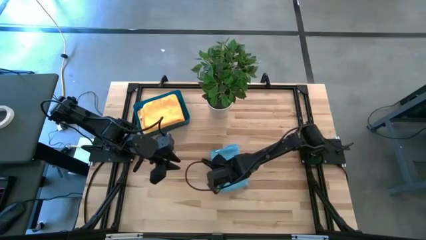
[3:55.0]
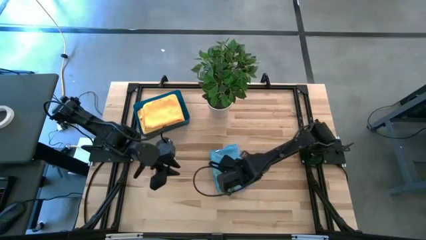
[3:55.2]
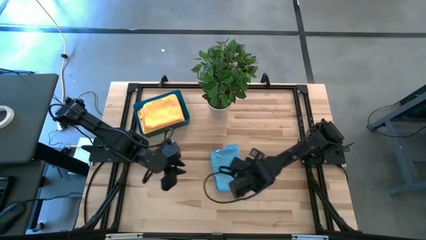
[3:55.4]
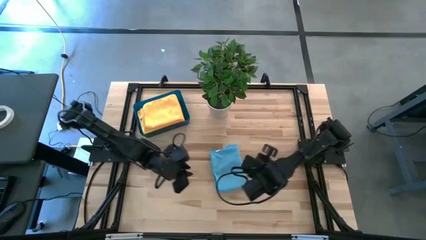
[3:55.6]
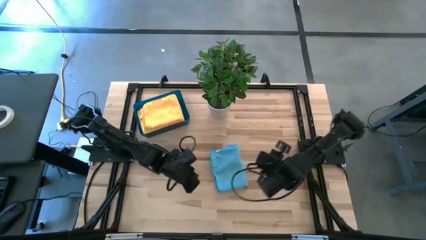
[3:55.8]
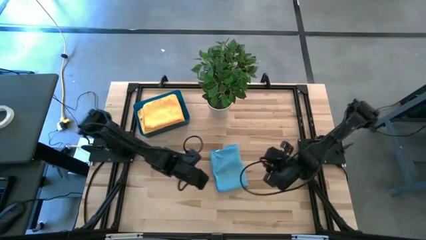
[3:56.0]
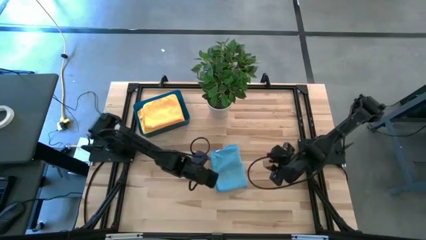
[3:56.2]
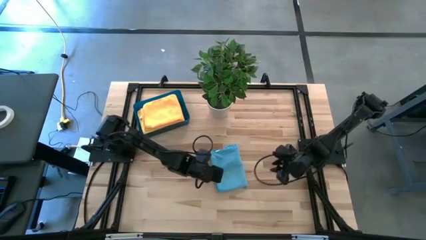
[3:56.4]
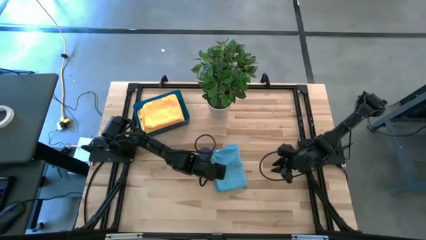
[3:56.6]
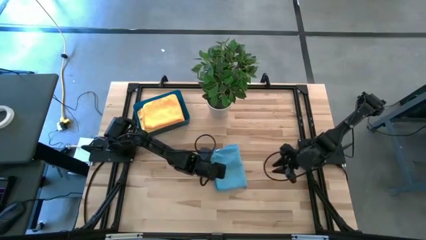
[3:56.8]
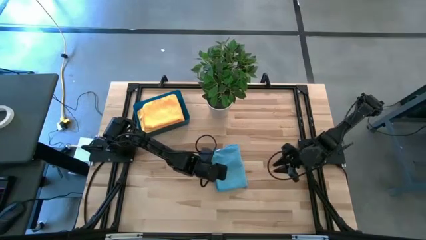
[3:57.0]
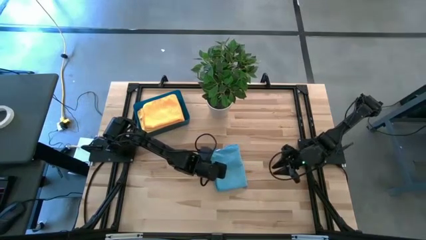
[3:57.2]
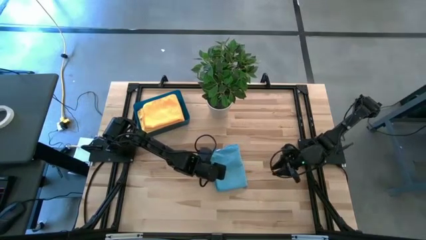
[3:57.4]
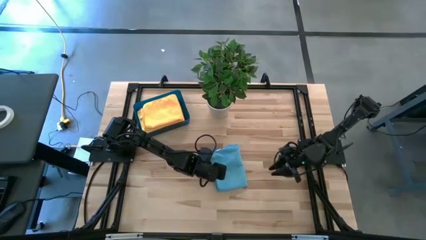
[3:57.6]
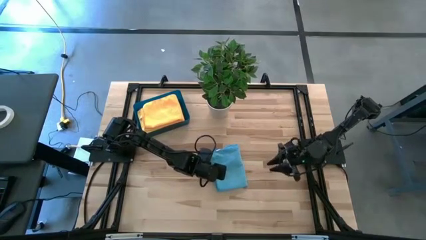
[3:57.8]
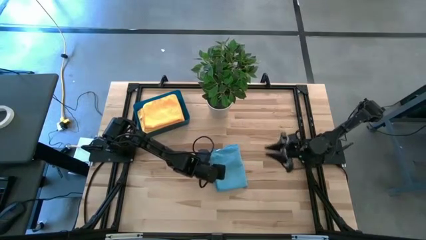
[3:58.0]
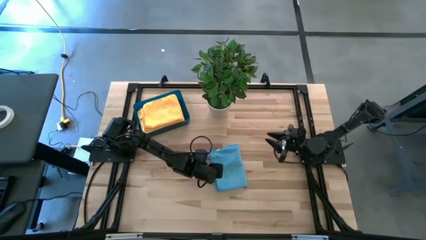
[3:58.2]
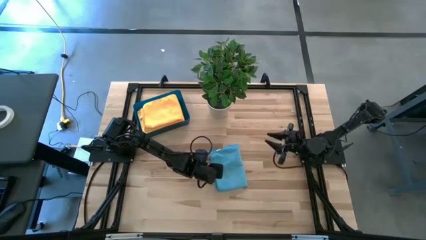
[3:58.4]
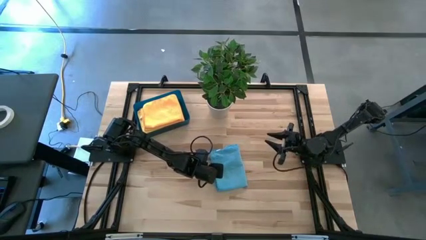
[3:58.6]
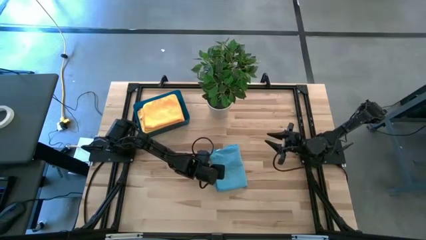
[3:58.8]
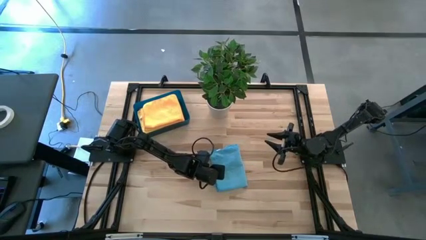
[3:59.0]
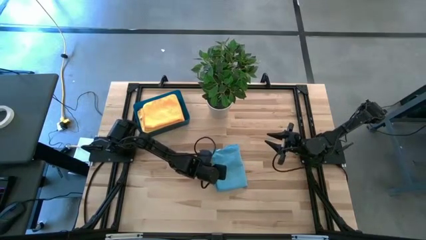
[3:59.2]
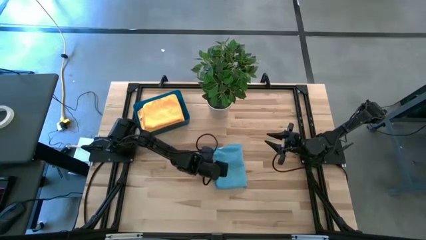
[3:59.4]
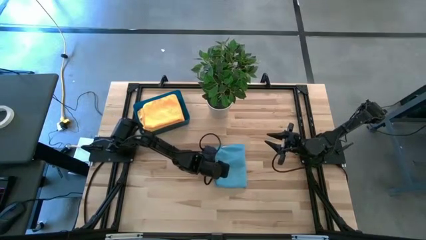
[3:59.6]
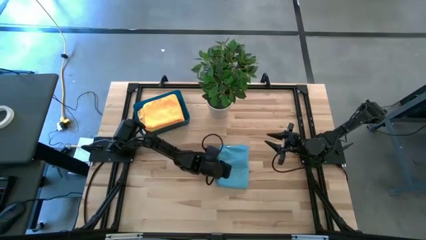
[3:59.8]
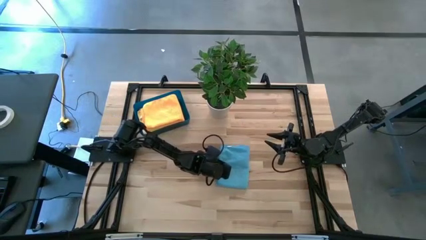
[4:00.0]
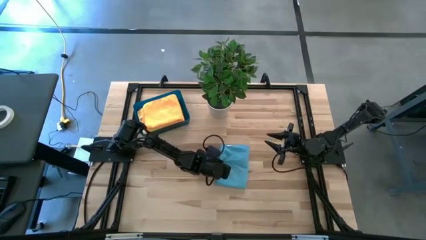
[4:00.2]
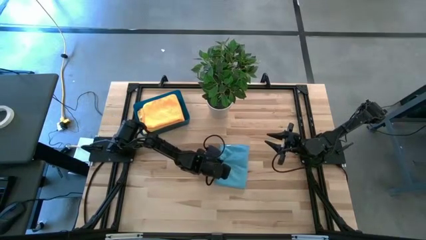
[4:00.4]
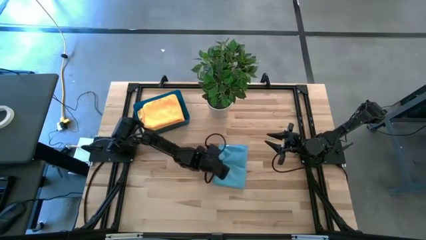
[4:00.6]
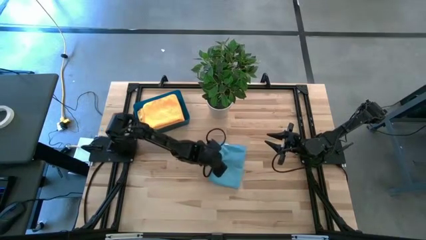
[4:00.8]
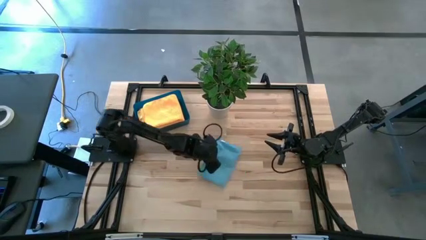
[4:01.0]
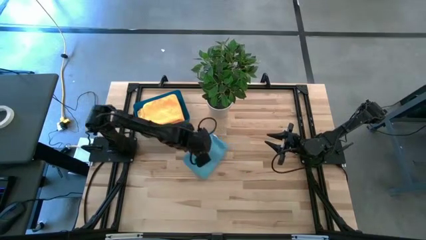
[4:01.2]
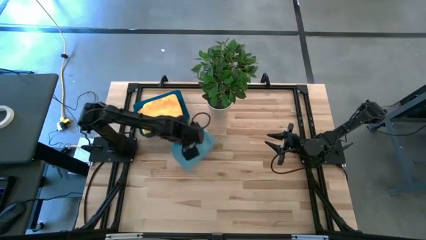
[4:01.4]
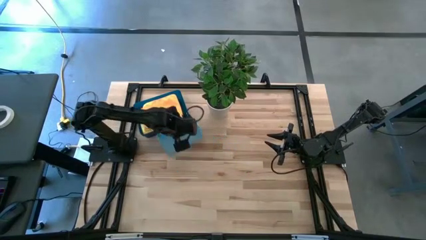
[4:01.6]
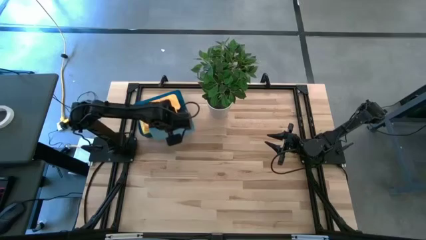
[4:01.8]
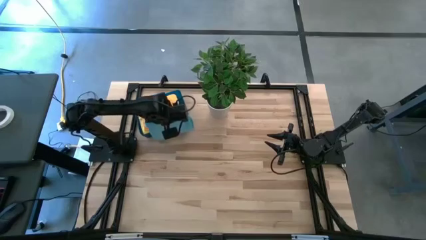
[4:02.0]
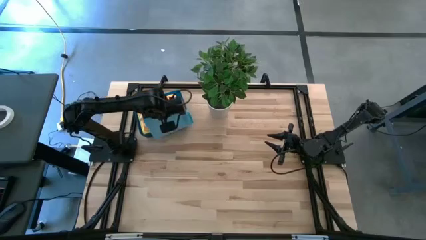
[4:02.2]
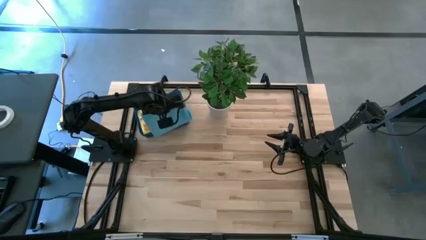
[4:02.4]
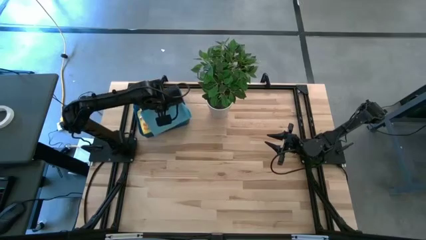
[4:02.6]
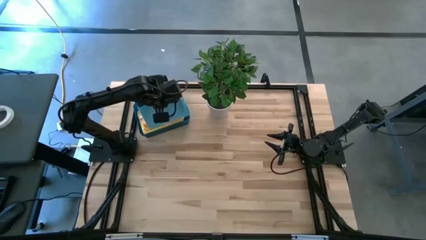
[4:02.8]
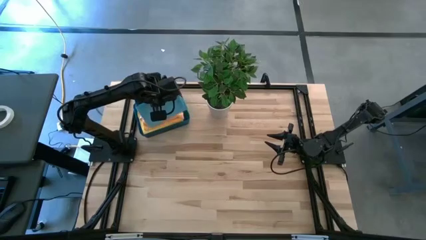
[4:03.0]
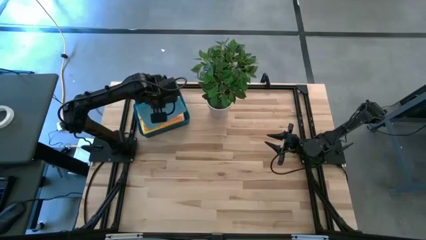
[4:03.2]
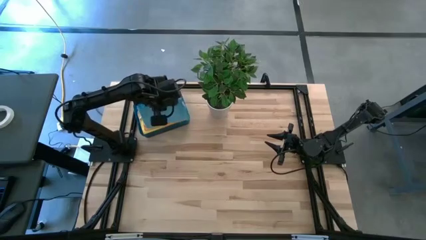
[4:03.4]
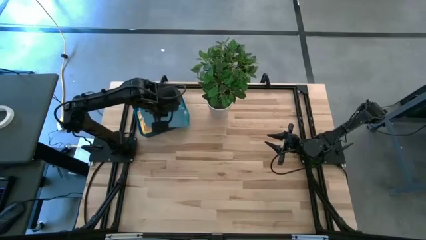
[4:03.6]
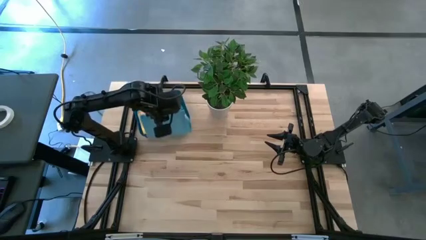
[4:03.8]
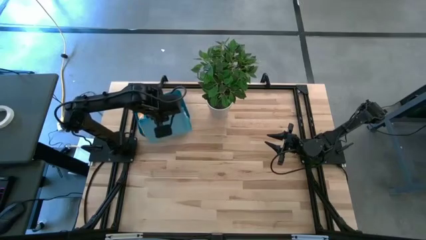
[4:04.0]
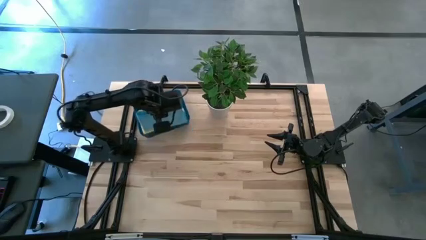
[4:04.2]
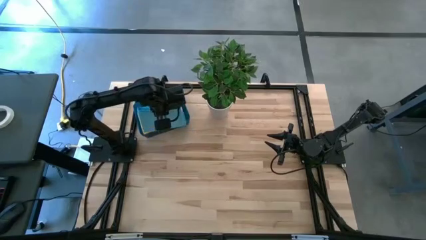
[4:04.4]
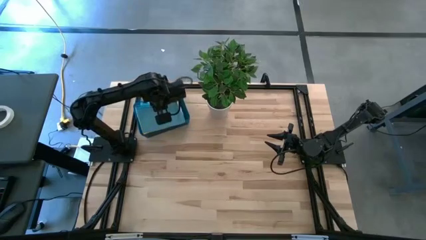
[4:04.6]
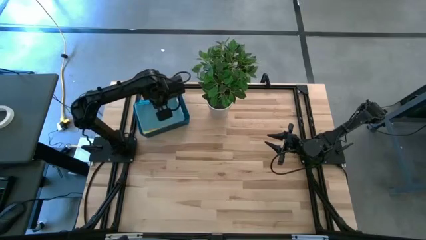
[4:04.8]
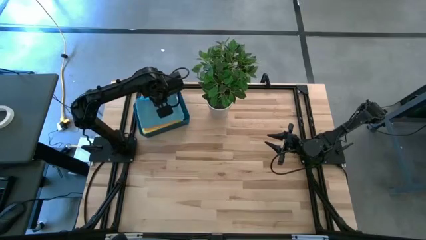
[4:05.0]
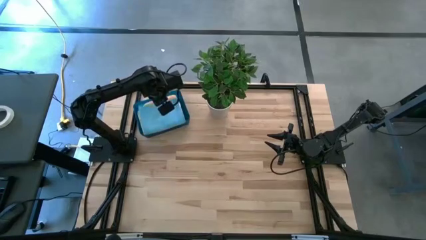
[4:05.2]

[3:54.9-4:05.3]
Task: Fold microfiber towels
Put the blue towel into the blue bin

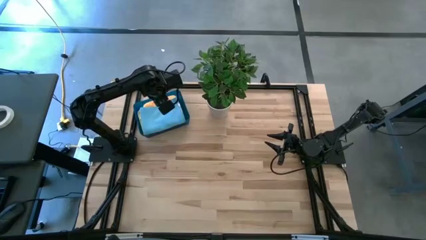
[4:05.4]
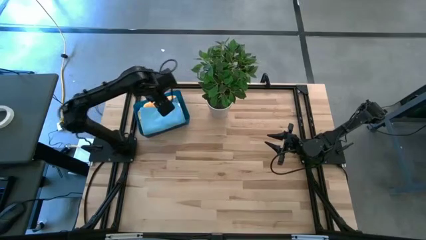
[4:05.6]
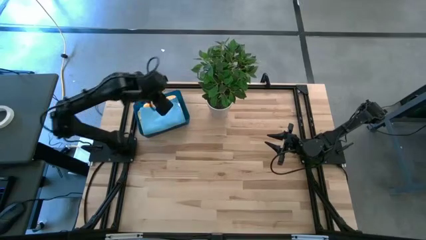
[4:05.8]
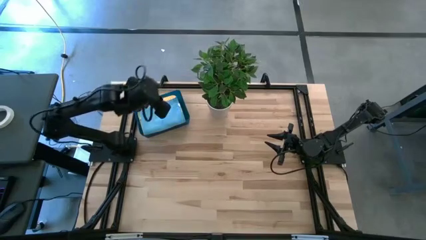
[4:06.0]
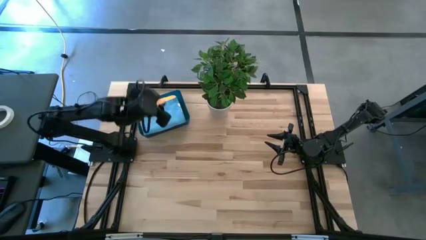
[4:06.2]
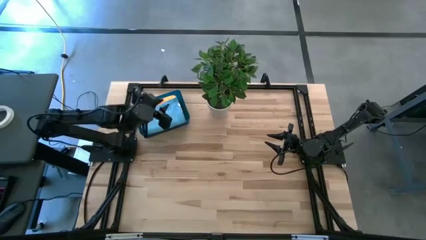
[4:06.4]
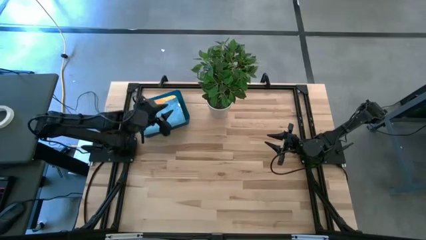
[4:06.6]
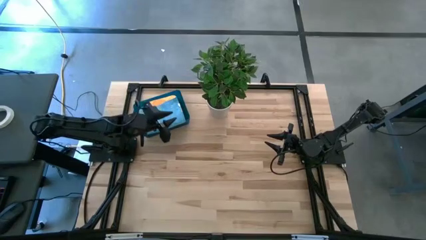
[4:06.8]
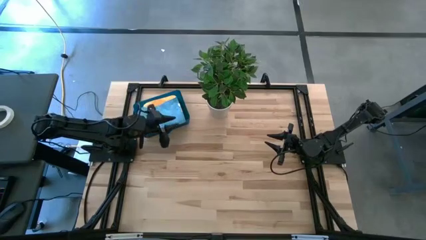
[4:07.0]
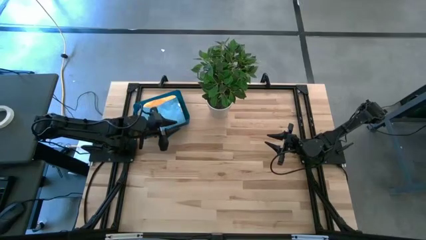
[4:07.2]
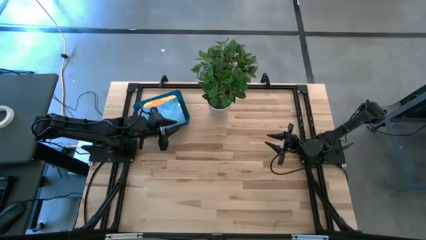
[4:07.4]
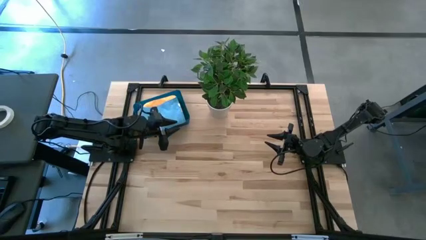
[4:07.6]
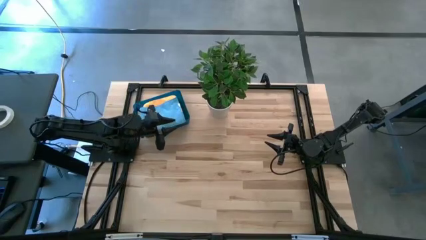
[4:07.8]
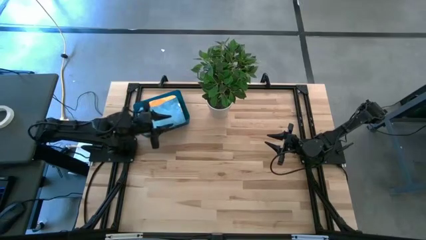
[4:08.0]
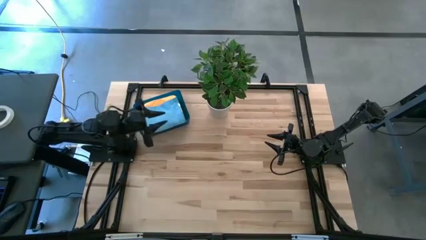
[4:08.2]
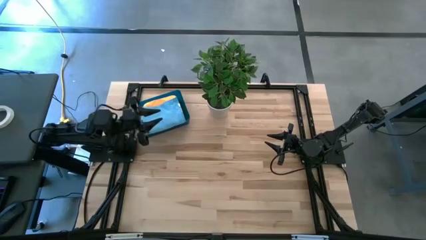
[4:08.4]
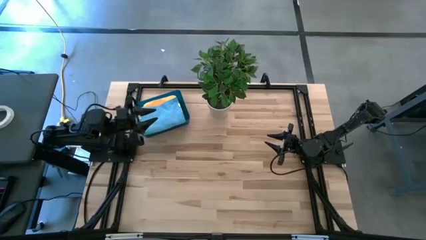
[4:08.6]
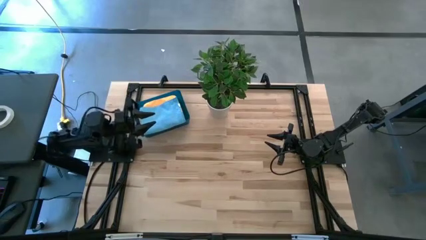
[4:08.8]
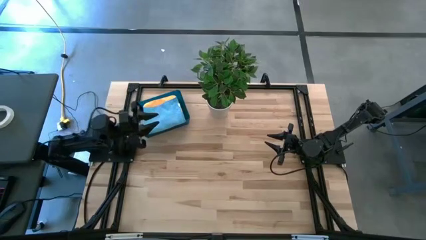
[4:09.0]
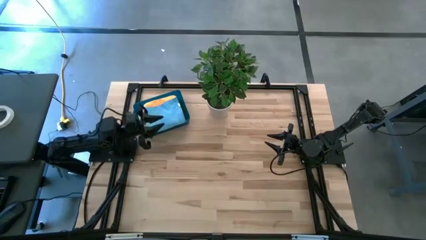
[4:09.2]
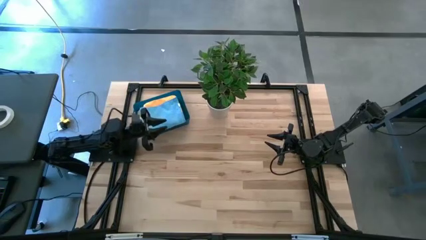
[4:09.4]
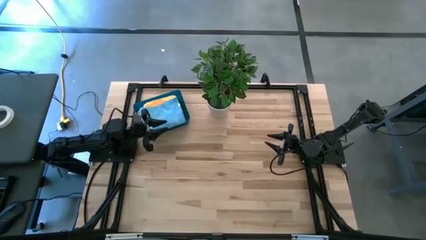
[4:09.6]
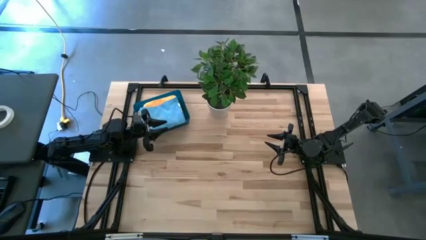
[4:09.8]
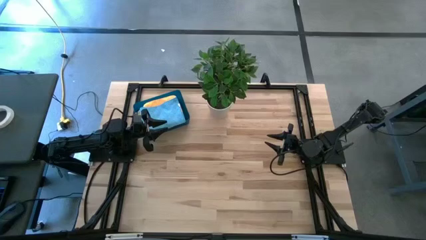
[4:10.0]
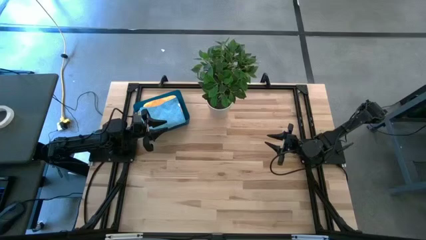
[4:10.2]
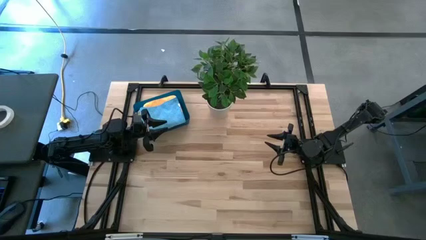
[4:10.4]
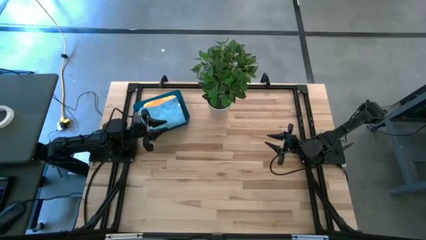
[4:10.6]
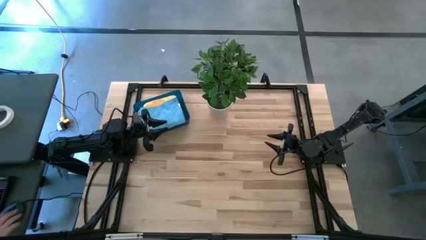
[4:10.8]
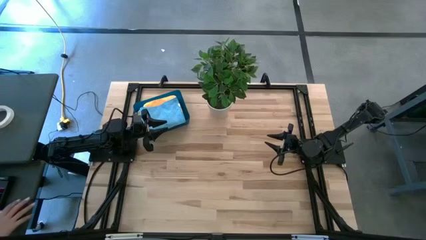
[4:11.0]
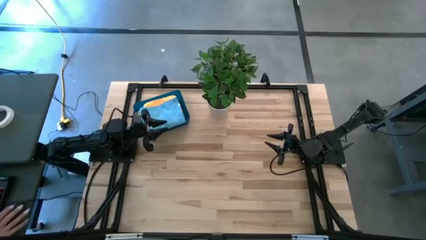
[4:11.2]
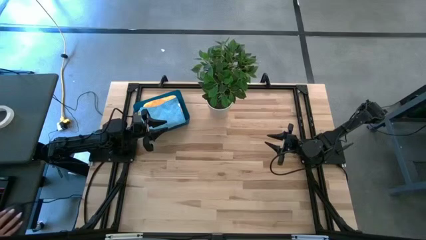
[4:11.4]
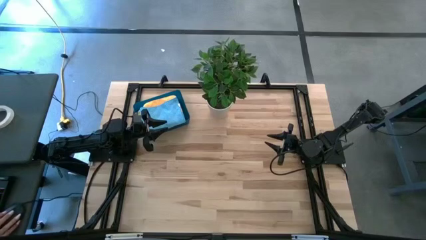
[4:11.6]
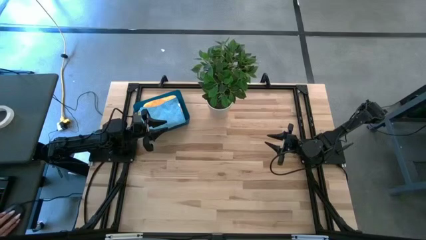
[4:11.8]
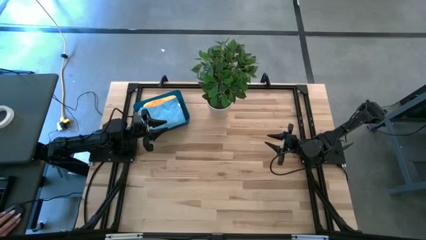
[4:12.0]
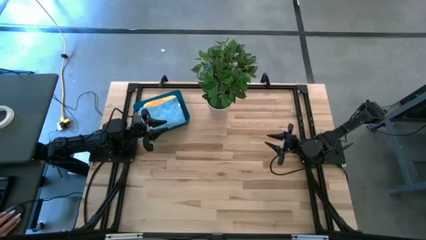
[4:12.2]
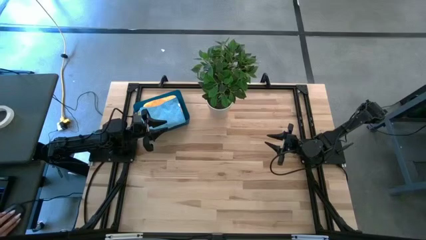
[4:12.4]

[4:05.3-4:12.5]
Return to Home Position
